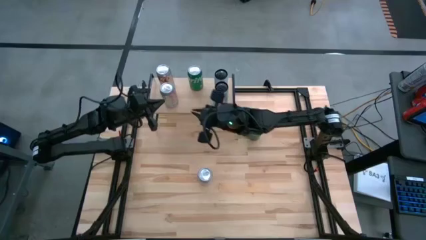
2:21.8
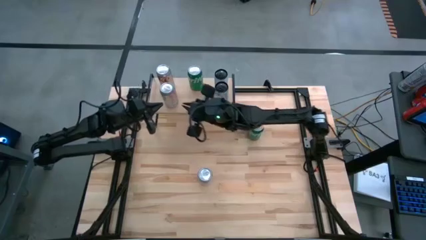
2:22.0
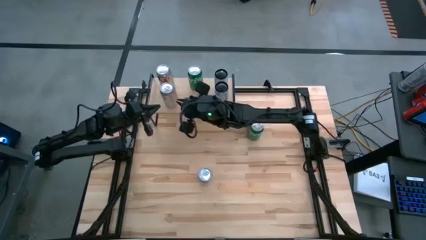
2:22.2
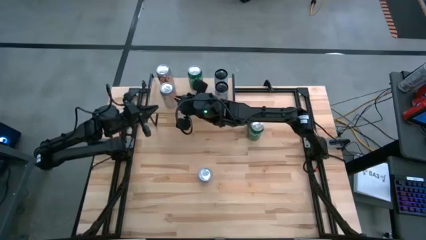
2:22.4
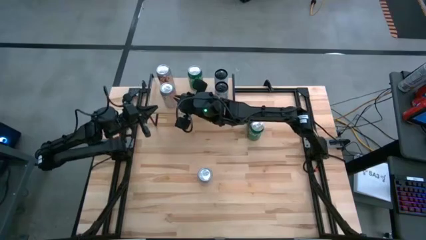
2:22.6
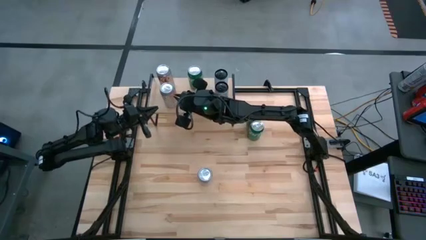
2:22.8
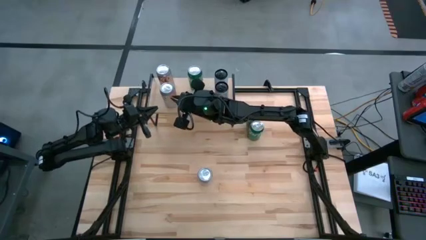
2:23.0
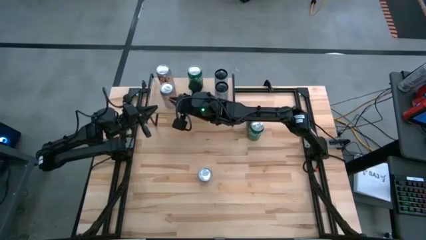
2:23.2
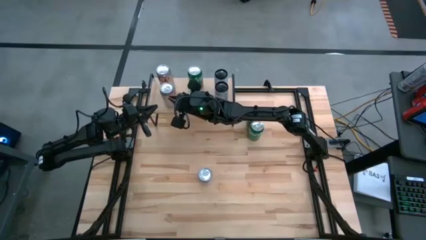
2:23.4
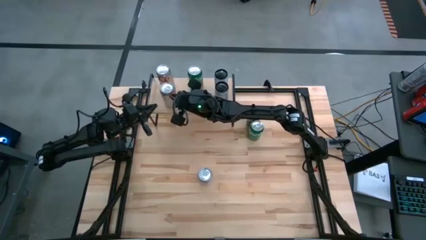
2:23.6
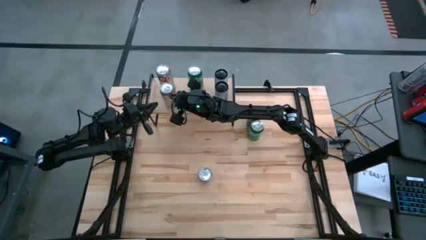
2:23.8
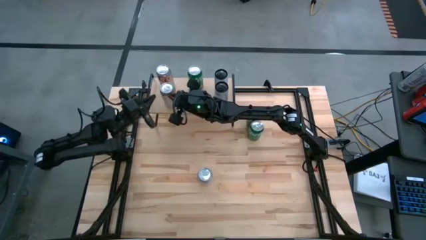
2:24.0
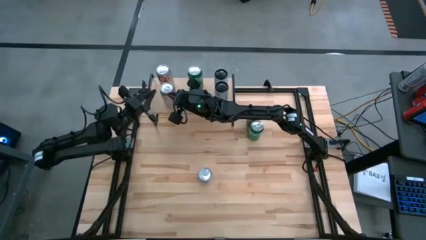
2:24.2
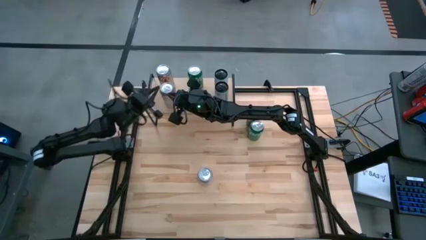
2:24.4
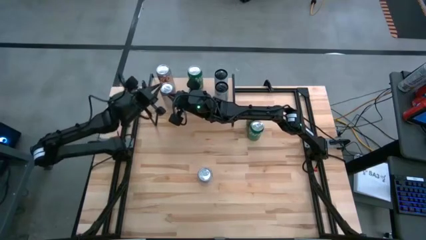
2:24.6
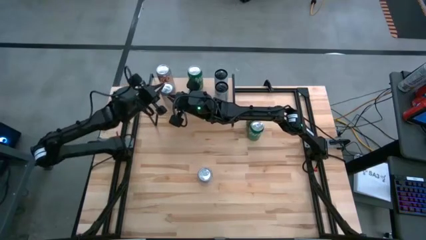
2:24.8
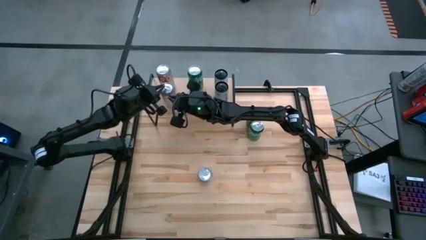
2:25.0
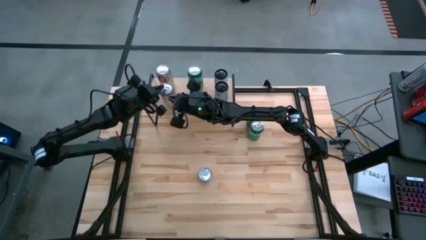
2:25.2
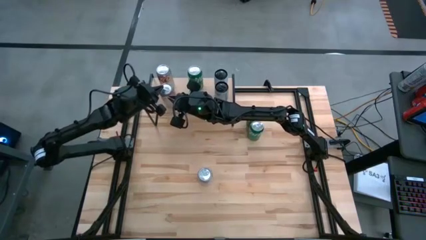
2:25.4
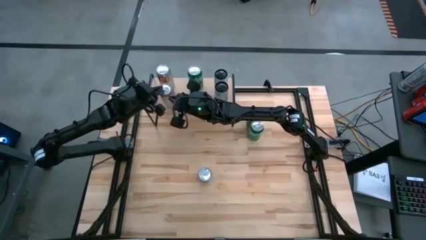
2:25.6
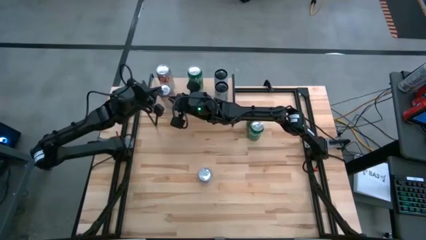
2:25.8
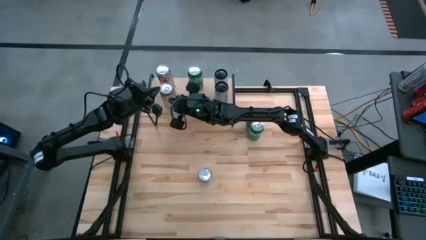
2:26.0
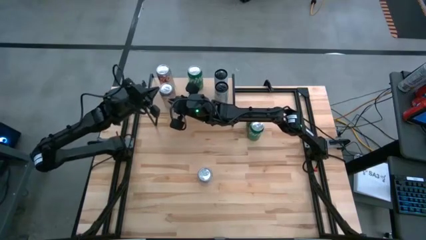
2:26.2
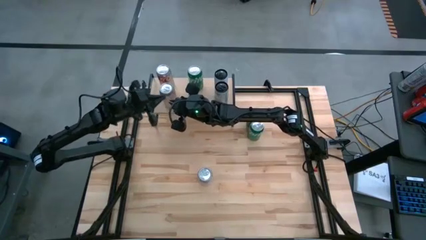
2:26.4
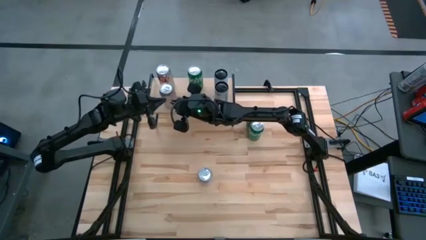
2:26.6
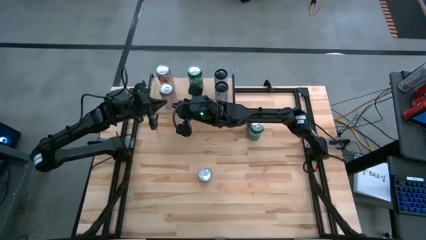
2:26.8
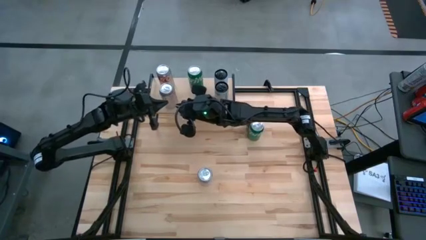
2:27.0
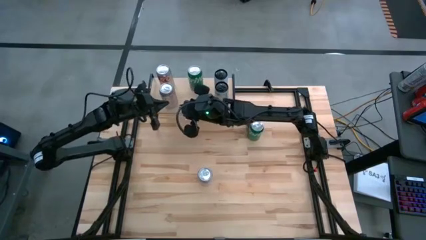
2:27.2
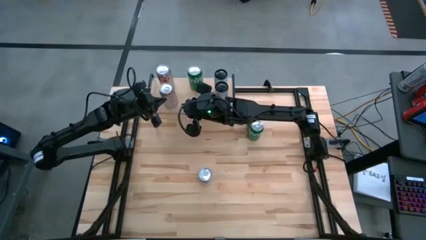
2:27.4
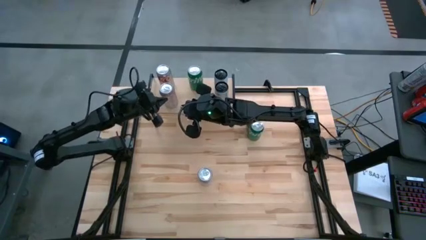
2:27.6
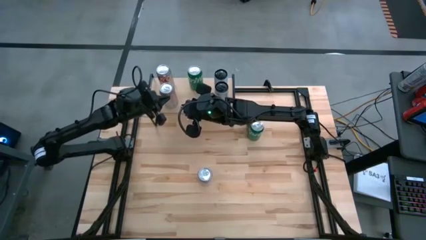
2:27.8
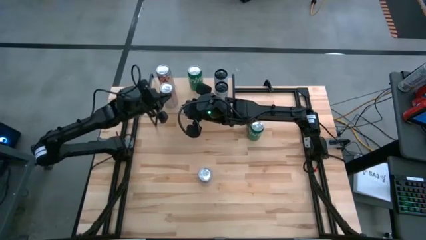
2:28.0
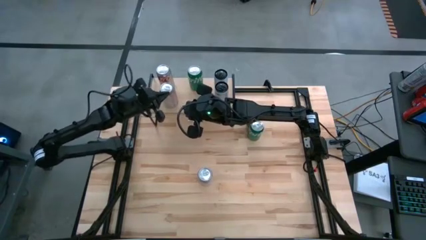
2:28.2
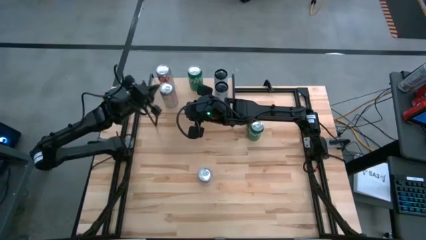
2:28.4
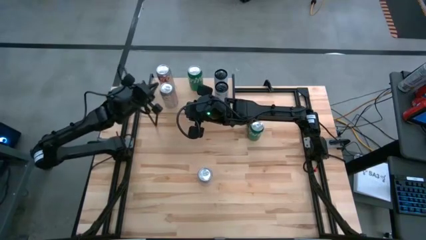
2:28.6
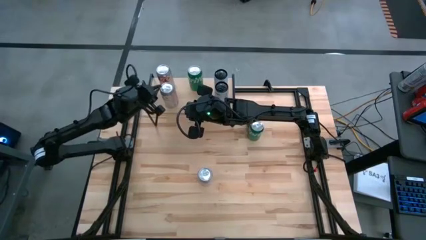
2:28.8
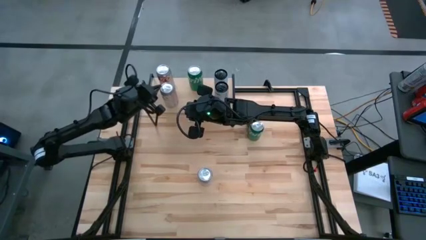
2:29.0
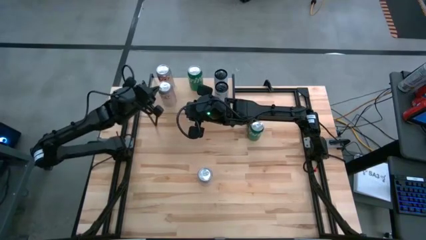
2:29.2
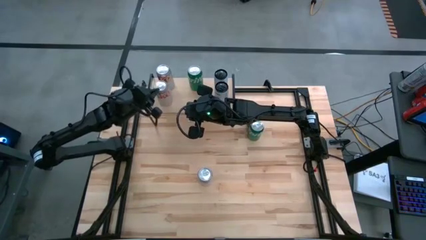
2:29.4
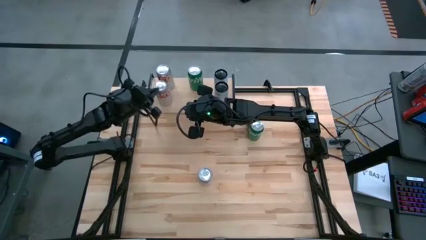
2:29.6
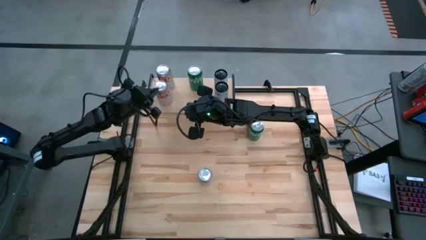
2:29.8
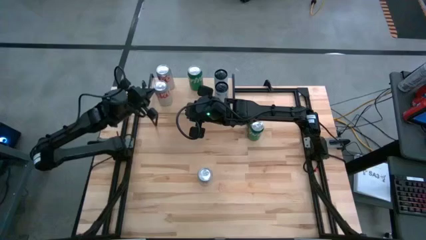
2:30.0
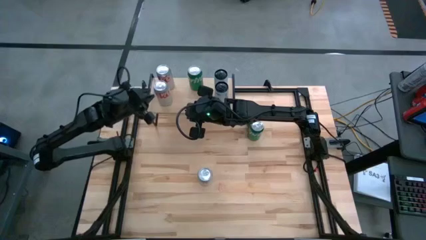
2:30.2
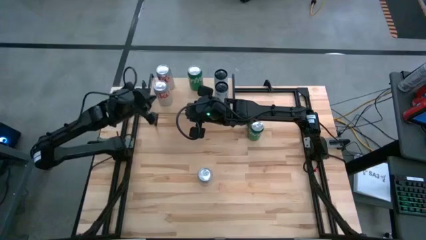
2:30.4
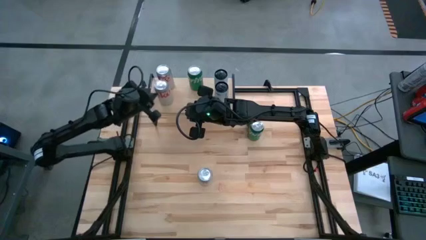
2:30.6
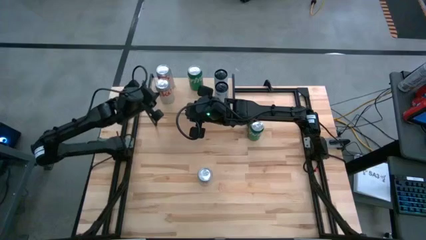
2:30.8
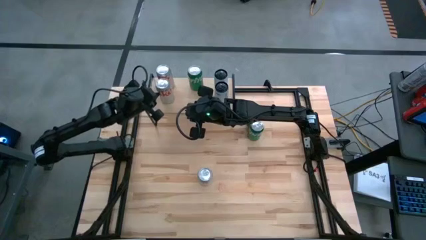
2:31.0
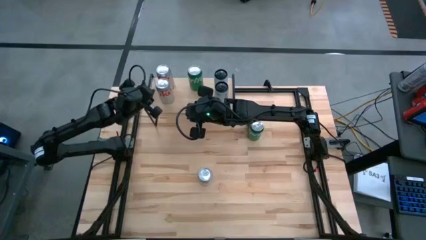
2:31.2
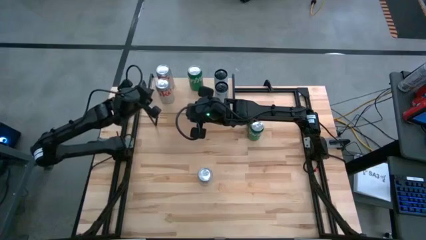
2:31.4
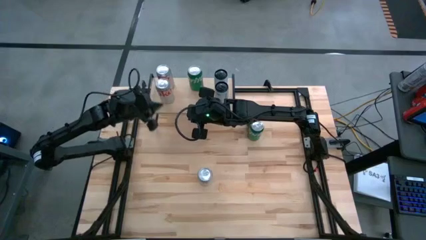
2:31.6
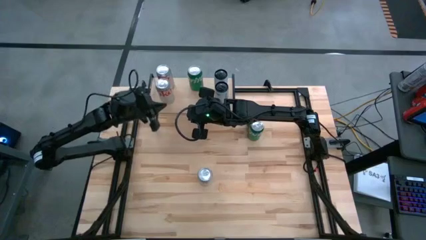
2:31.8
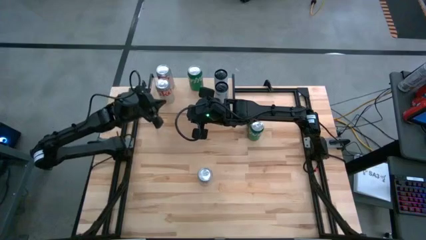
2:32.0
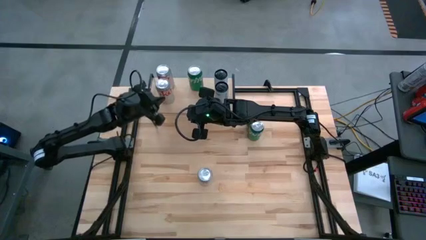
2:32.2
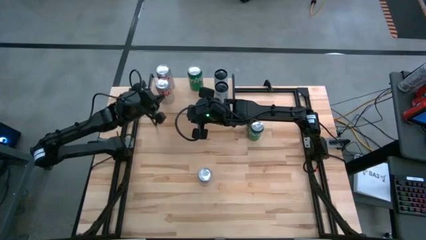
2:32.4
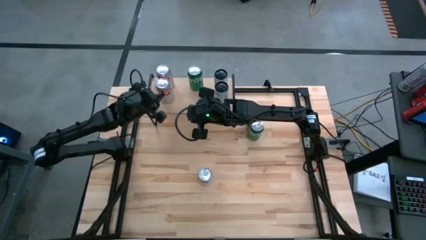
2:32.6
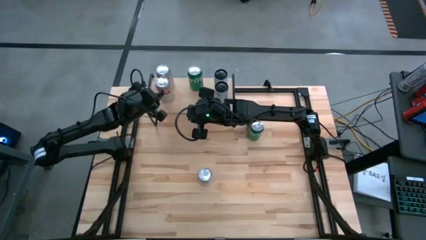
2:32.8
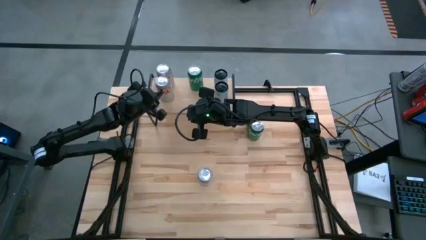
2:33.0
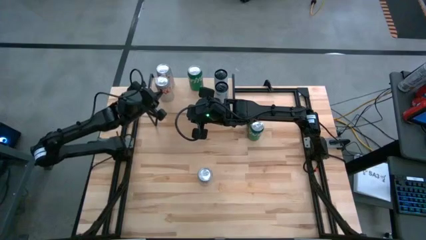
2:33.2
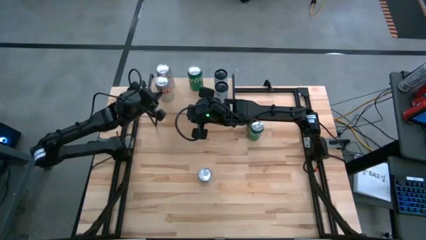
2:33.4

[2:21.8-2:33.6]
Task: Place canned beverage on shelf
Put the top red and silver soda can aligned with the other red and silver soda cans on the shelf

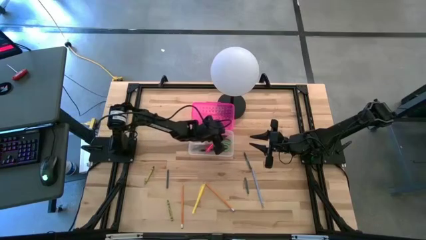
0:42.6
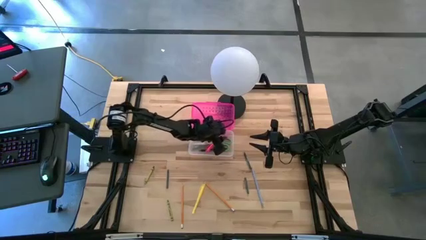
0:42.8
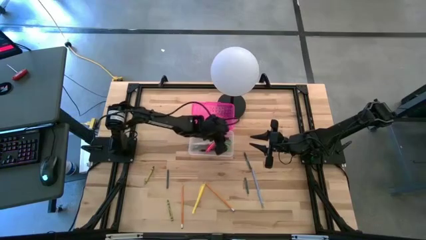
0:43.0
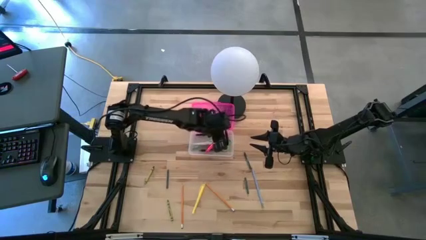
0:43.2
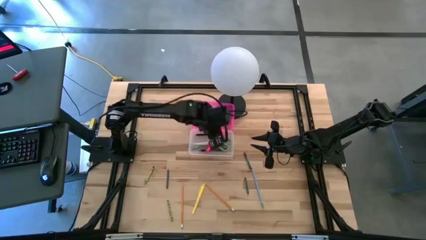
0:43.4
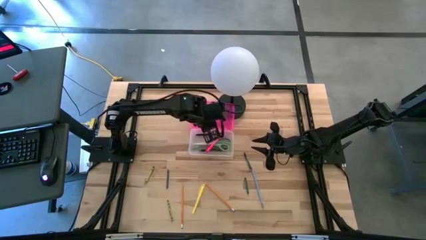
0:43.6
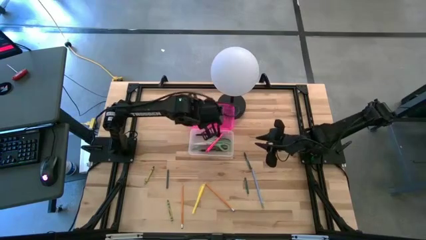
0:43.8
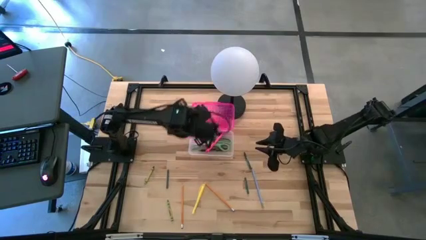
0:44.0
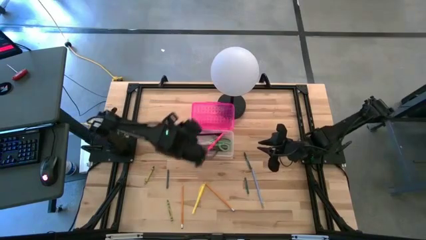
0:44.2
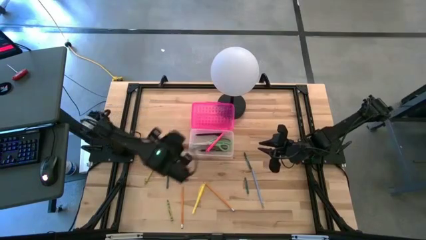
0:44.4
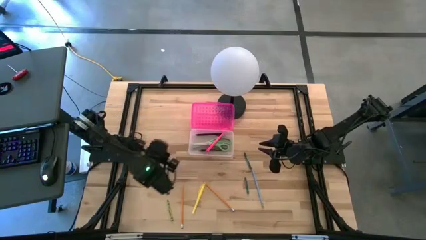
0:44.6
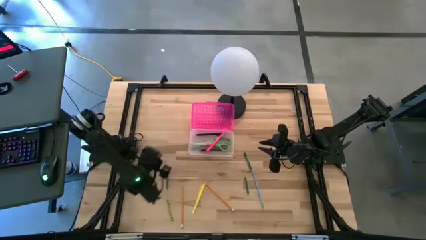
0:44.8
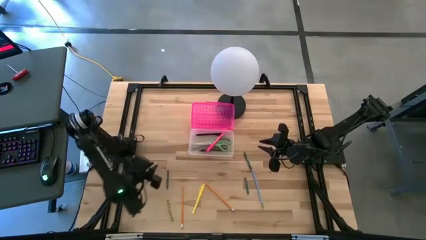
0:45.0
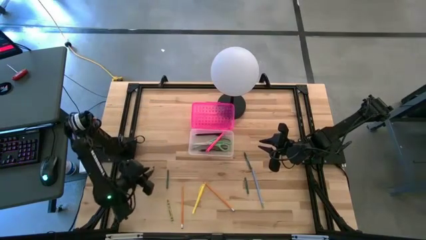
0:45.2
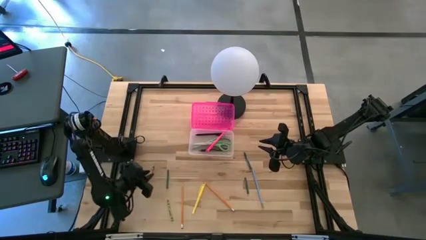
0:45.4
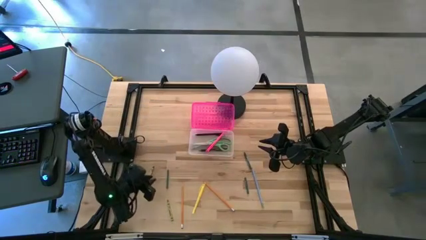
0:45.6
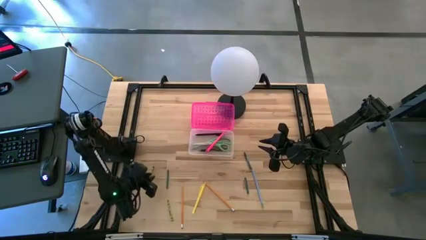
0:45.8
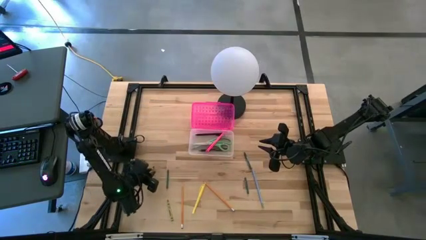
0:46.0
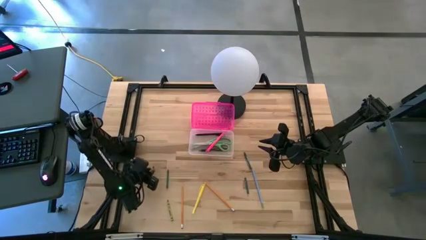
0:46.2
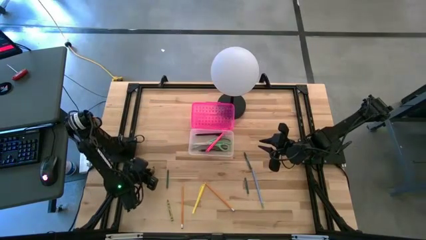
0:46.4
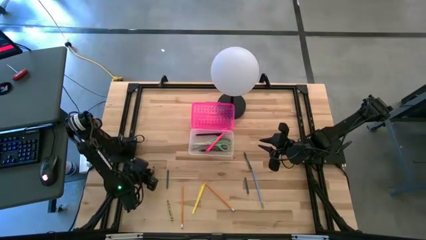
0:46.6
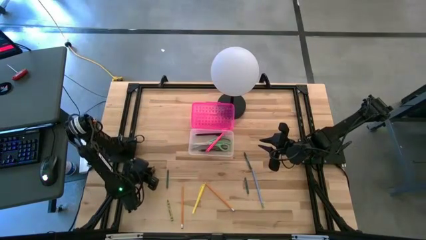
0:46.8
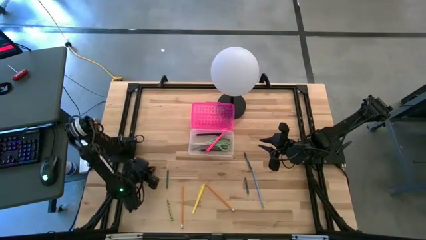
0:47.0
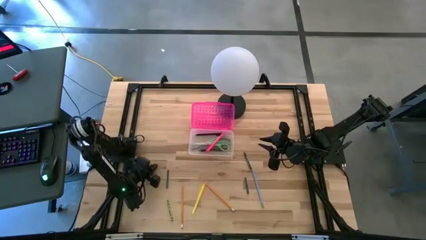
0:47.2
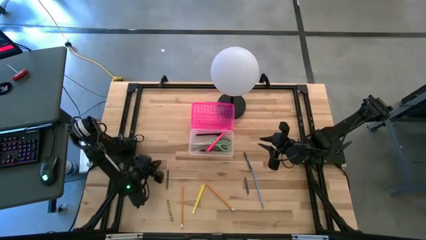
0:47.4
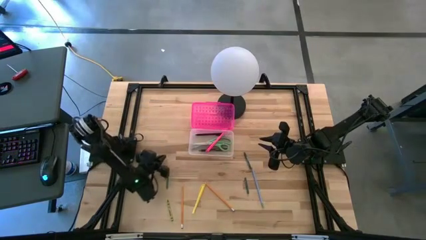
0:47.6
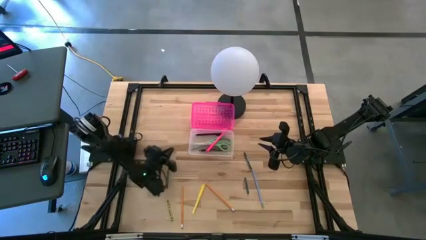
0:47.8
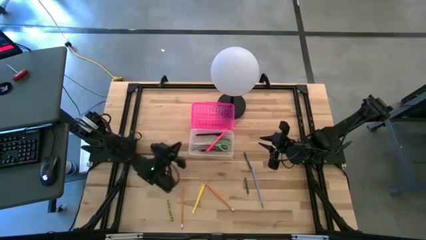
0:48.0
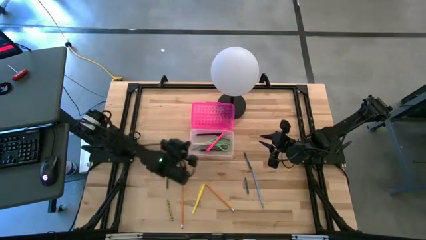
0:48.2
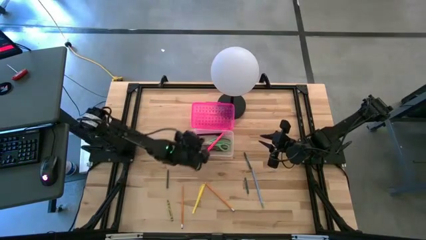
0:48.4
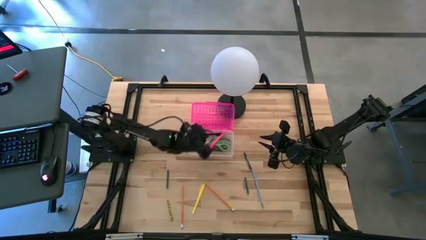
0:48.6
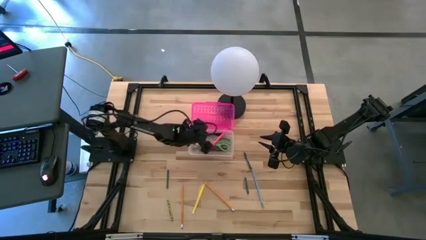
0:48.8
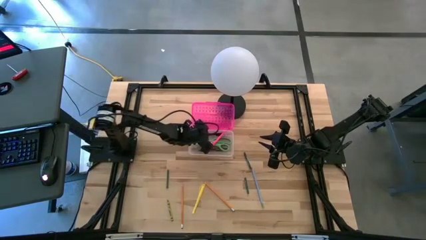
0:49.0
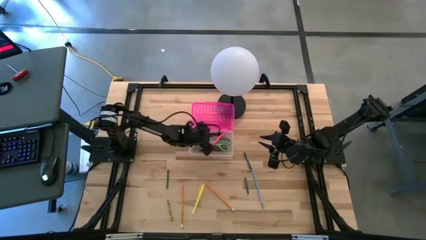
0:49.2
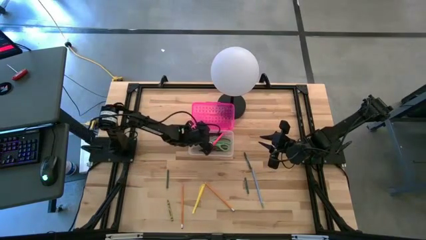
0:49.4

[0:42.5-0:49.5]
Task: Pick & place school supplies into a supply box
Put the top green crayon into the pink supply box
